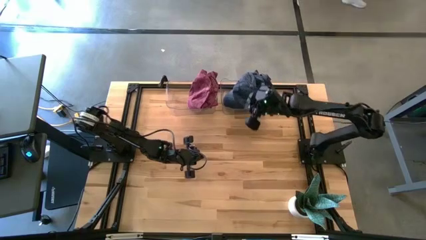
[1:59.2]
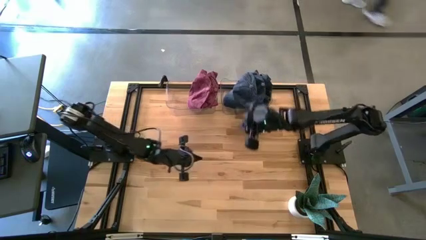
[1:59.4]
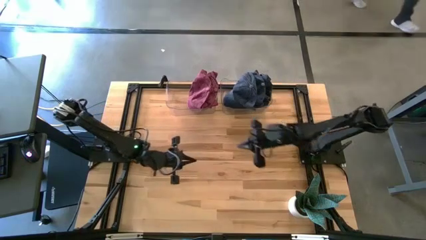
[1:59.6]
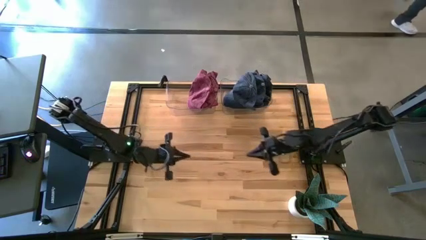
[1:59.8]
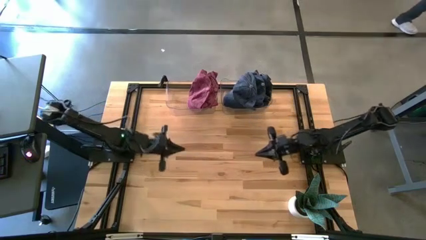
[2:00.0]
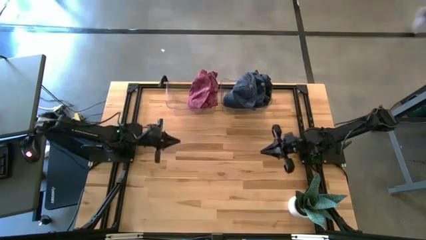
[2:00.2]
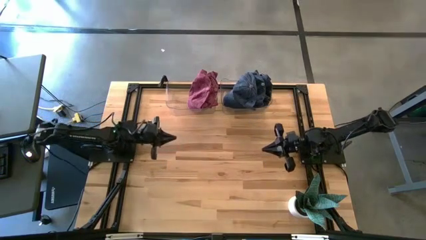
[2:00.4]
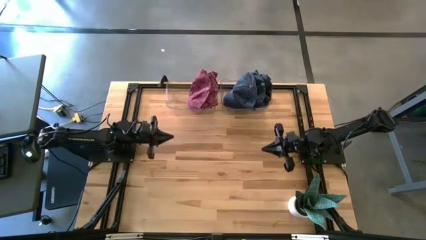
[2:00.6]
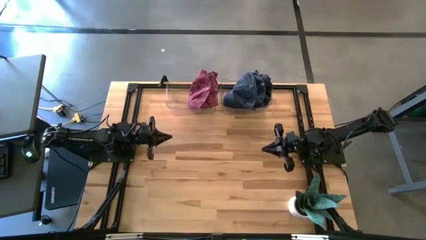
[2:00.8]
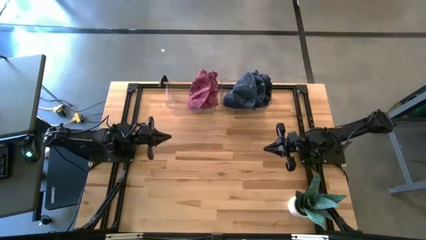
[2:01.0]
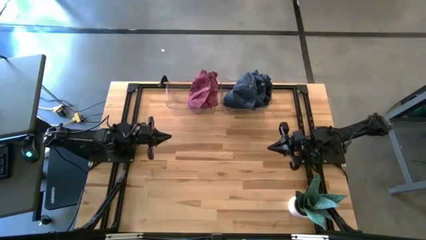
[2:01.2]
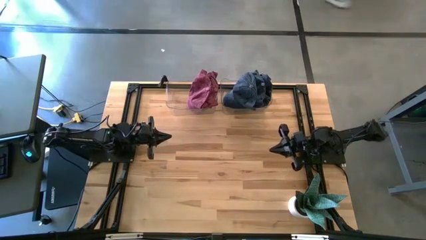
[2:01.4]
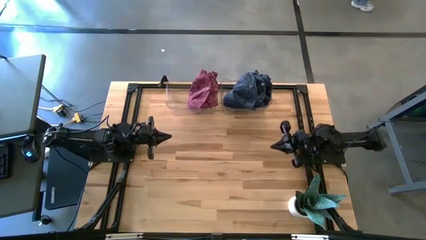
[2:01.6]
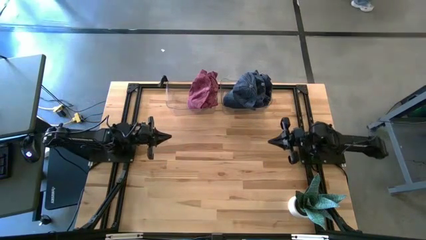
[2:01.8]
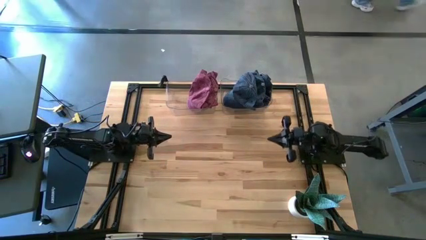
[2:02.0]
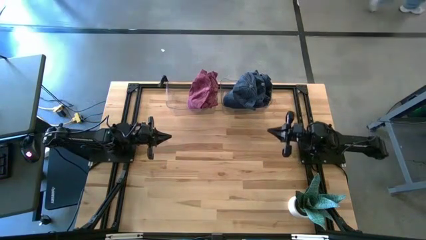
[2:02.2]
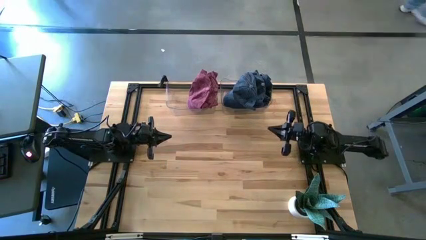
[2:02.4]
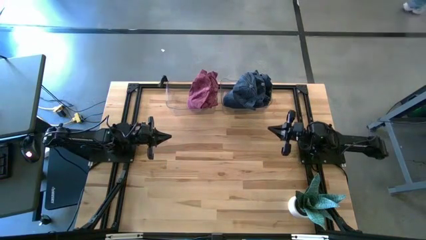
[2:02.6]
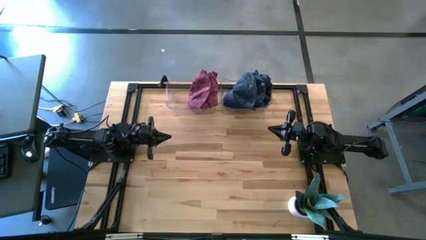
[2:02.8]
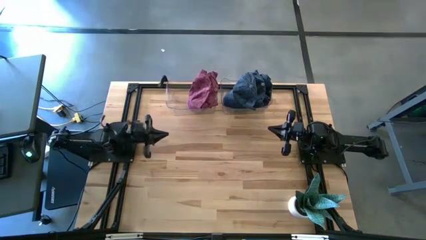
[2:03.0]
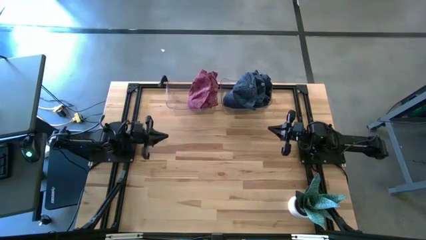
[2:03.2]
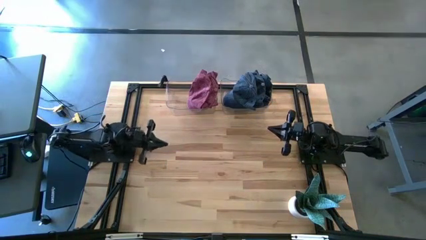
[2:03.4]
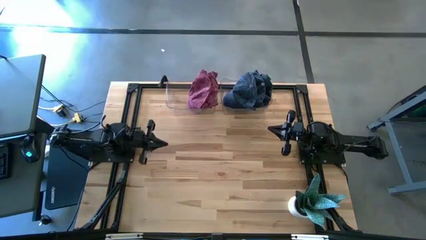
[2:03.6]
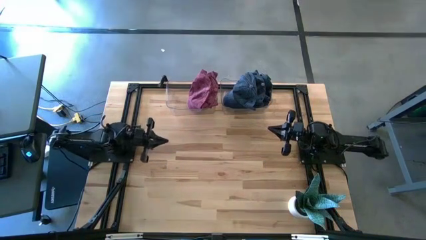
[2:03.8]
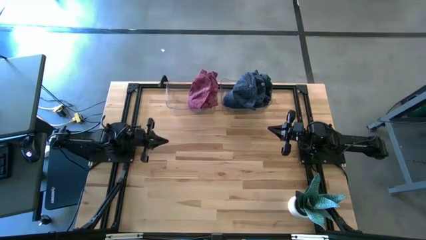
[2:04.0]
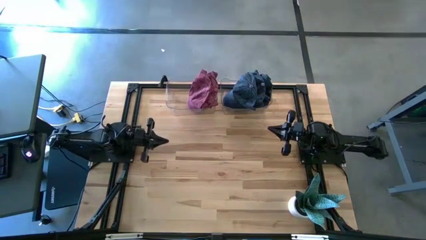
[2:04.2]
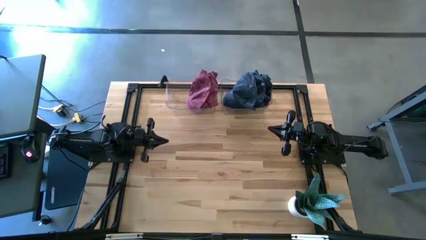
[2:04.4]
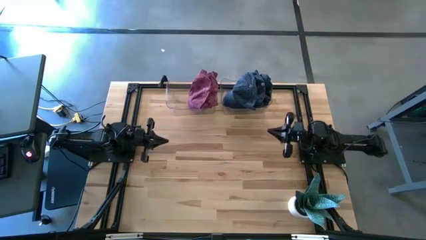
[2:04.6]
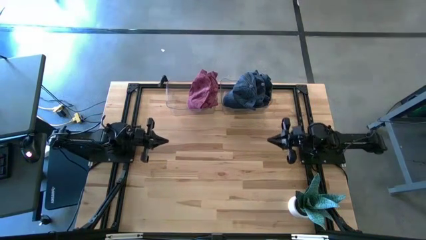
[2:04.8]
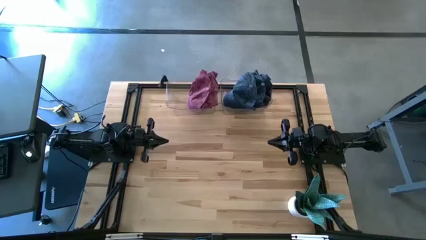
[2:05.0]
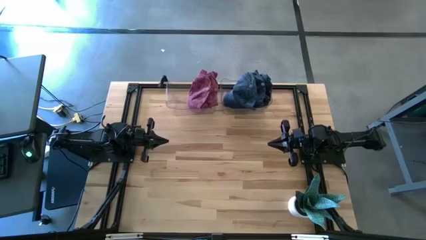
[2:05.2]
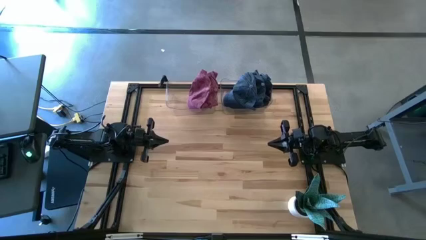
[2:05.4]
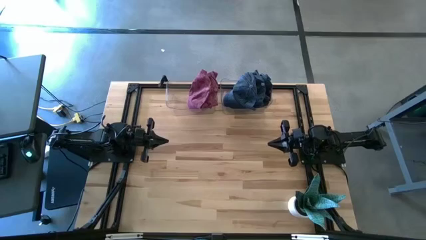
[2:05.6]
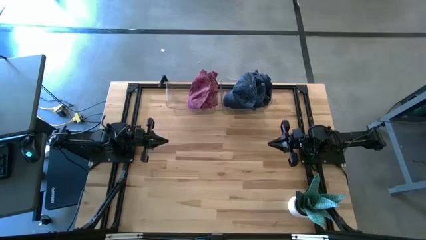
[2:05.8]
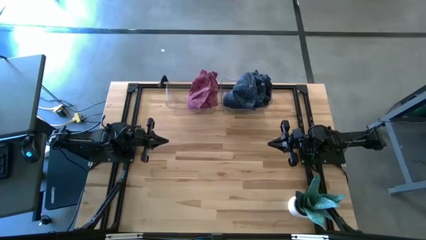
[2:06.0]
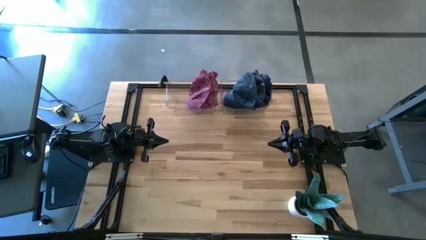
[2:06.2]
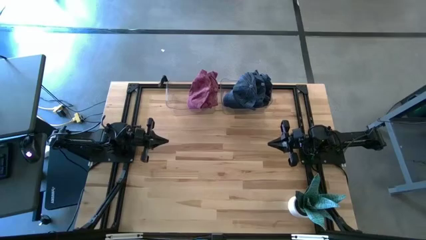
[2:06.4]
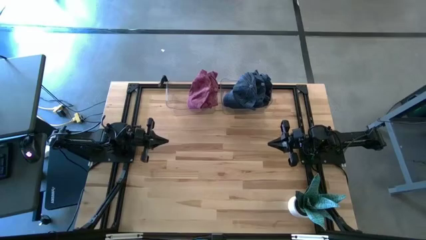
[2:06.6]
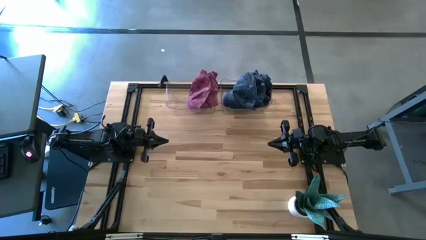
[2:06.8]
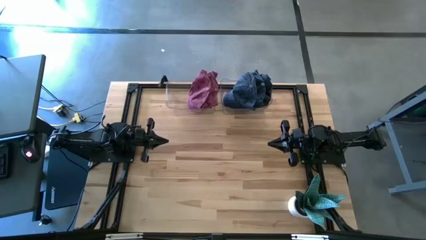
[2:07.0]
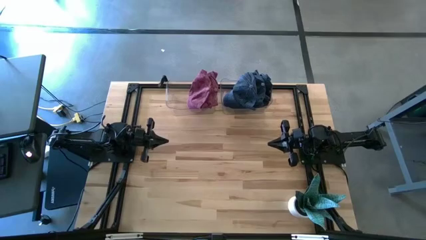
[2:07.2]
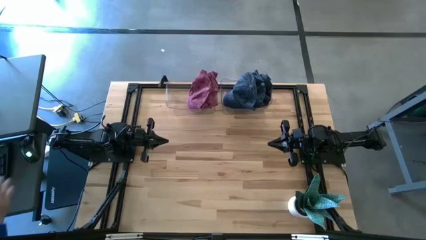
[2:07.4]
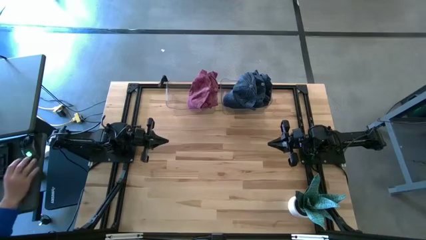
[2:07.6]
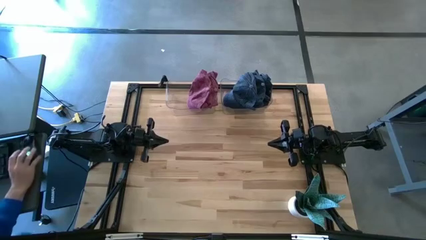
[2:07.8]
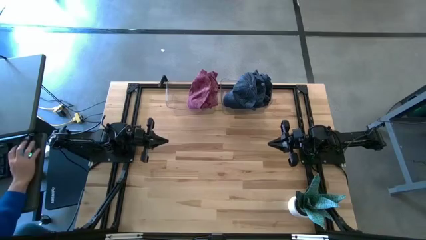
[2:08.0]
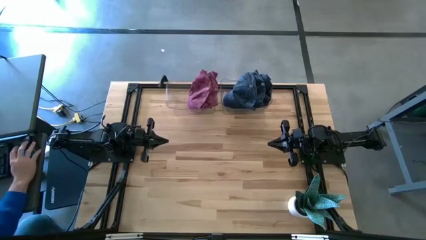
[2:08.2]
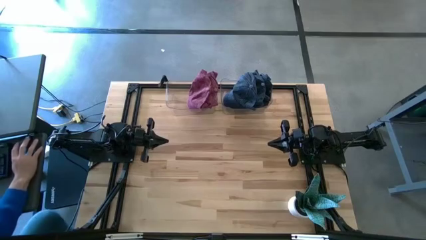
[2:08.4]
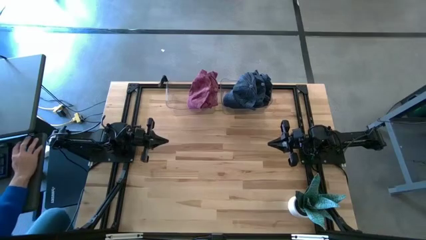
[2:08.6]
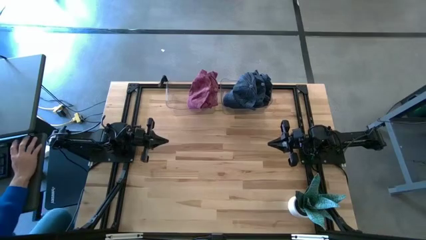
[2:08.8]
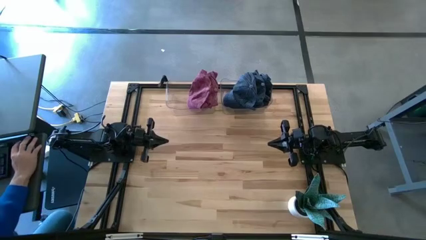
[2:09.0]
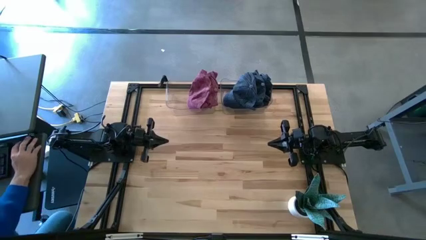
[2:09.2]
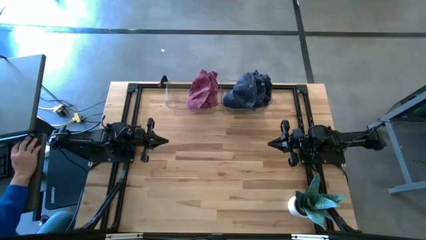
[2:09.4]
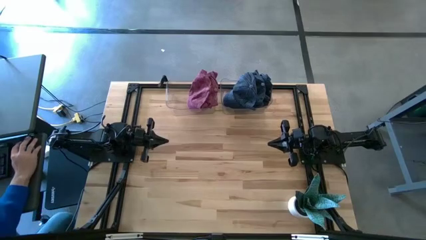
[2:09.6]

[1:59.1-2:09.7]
Task: Pick & Place hat
Return to Home Position

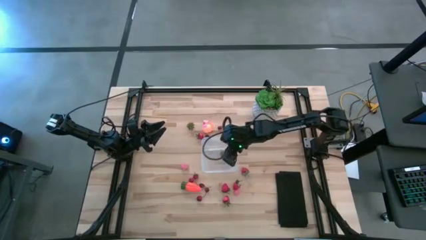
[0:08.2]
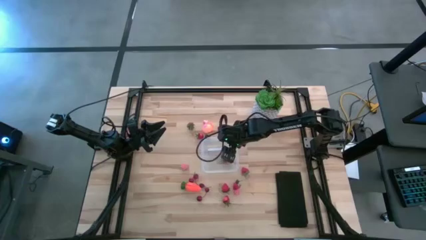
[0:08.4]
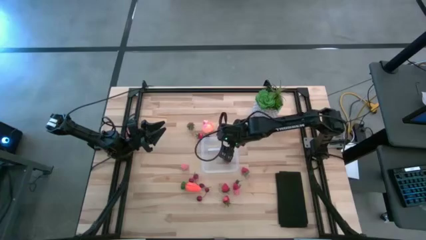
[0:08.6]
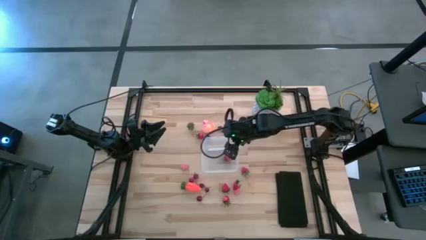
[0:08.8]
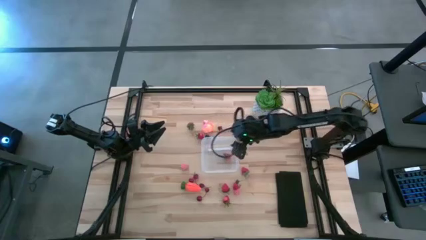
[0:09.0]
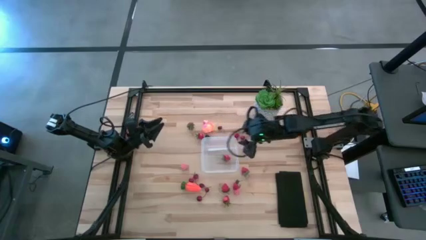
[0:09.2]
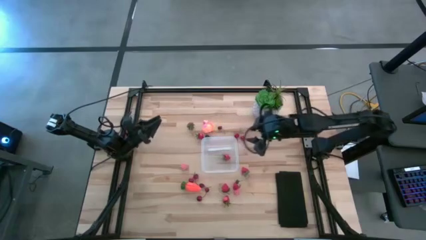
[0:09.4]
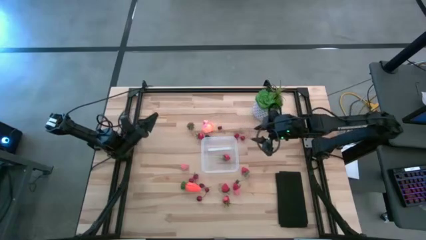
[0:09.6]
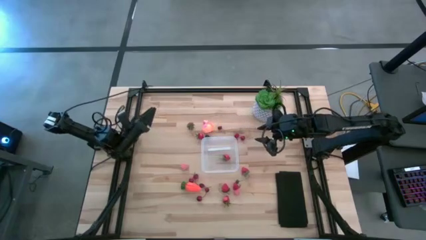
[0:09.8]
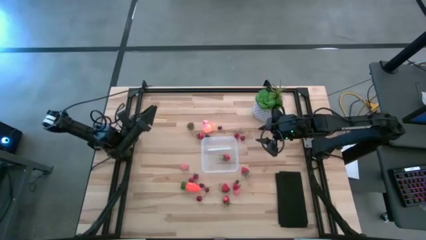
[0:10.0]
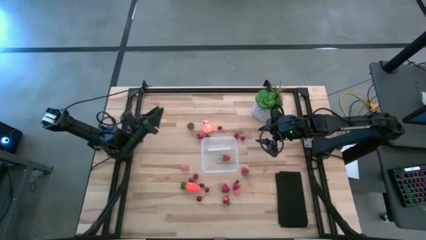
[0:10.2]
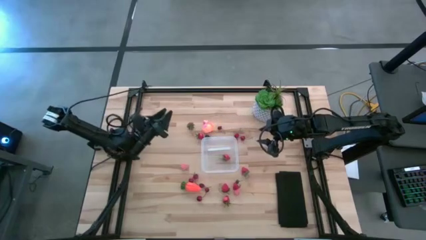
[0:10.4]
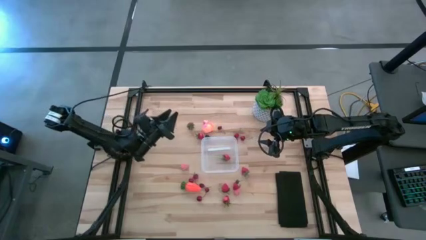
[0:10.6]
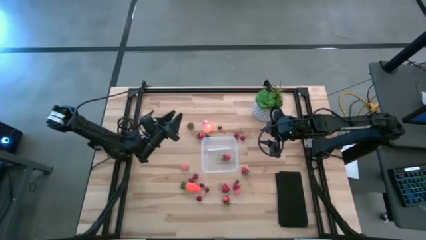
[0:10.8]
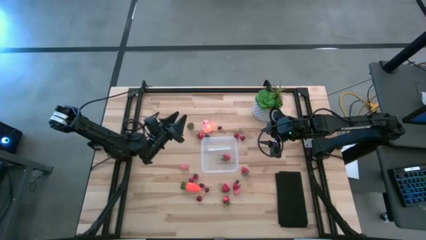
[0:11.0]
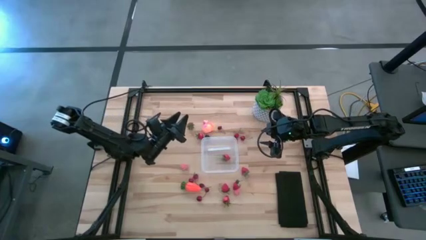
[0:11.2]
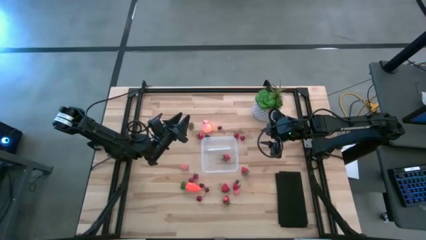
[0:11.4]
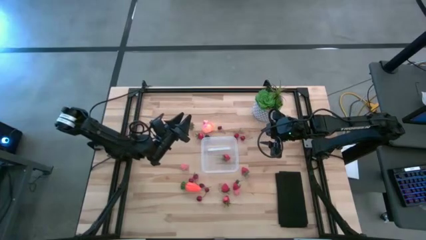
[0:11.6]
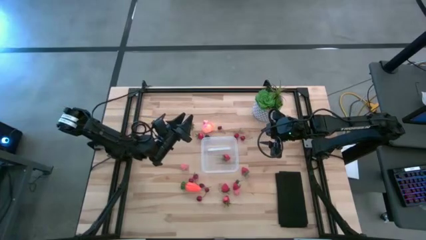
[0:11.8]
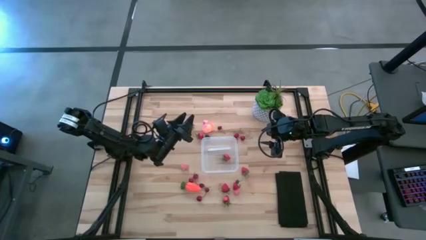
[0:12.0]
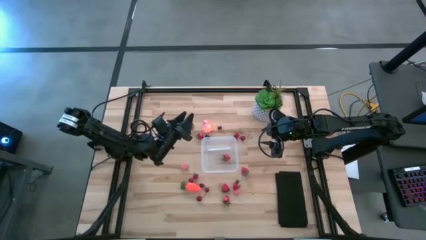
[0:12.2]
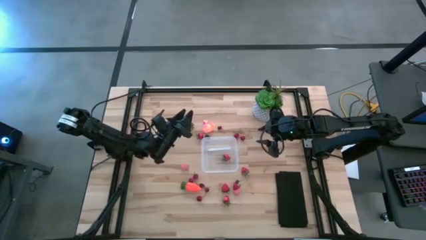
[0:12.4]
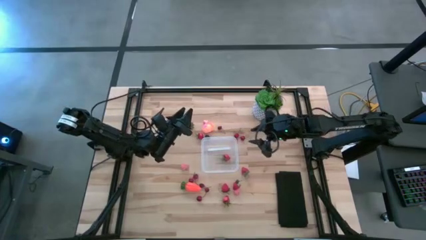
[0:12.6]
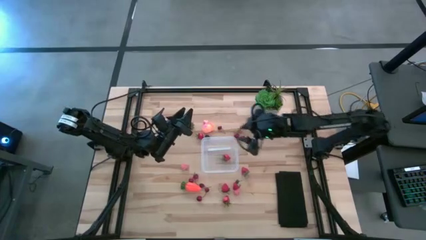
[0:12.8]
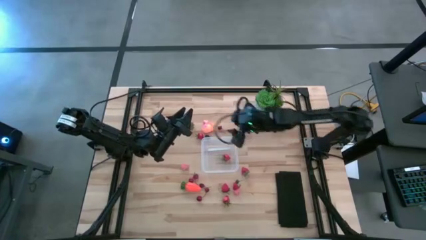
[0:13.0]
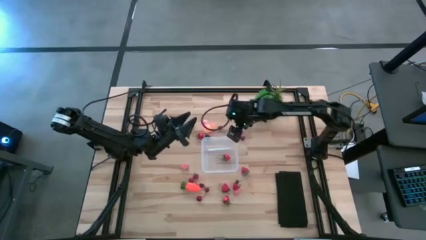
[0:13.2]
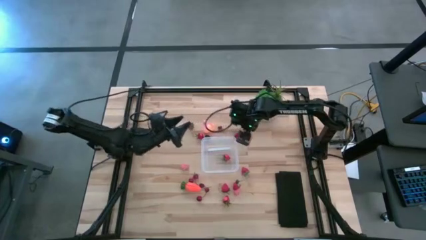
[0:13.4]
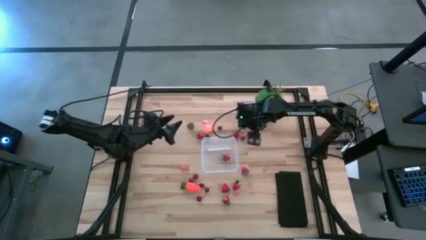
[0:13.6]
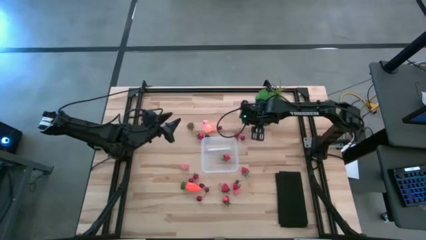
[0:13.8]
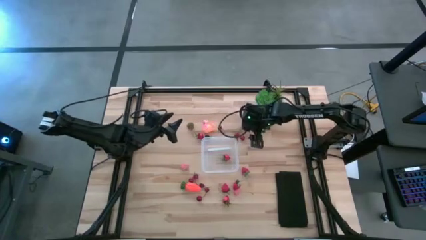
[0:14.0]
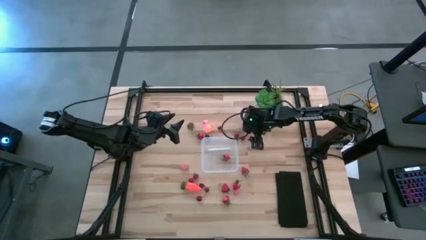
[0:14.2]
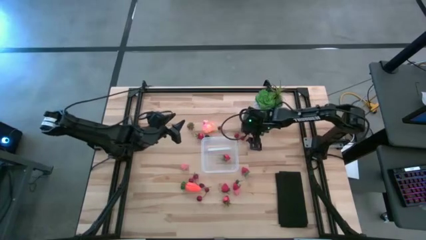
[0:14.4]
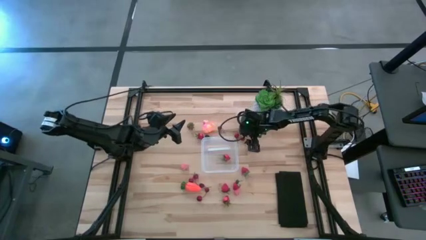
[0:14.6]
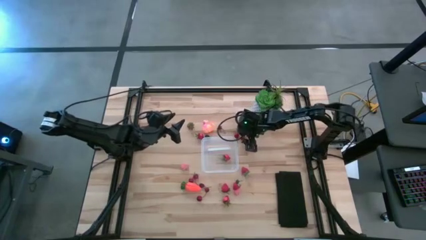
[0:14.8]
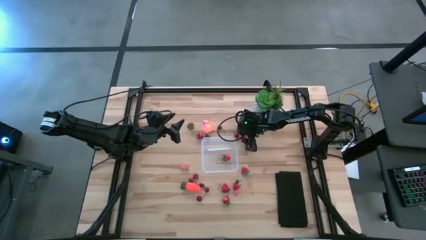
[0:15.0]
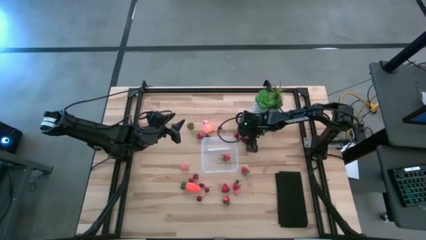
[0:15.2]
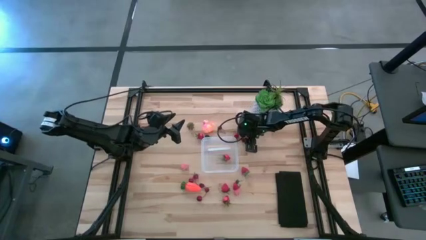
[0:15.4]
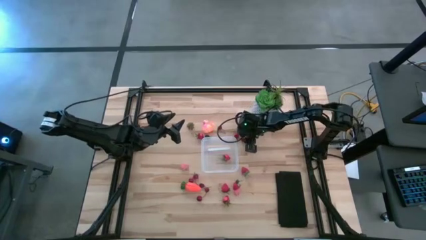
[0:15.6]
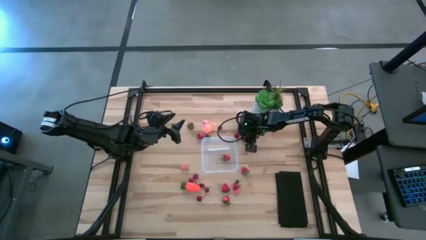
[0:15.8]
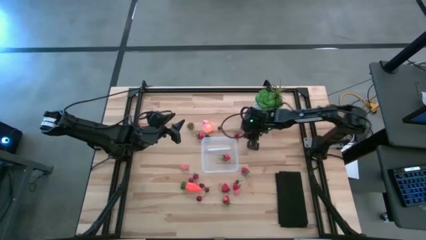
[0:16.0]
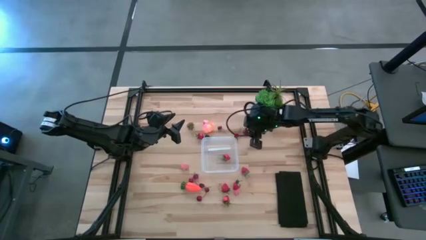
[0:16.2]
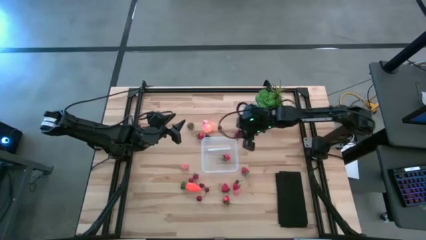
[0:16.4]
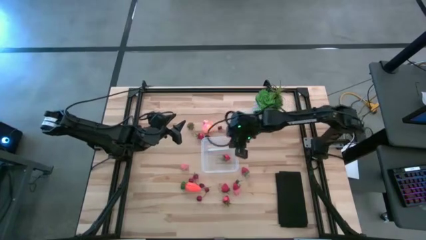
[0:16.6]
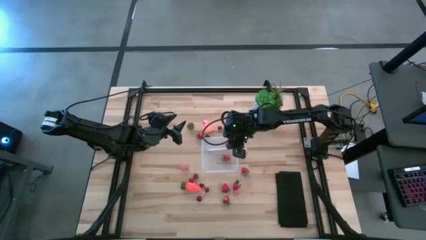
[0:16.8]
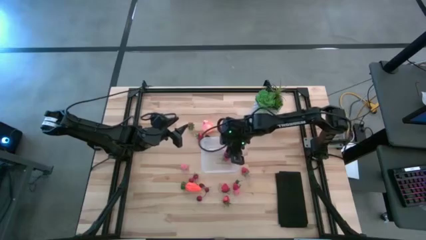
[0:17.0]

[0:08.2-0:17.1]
Task: Pick and placing Produce into tupperware
Put the red cherry into the transparent container
